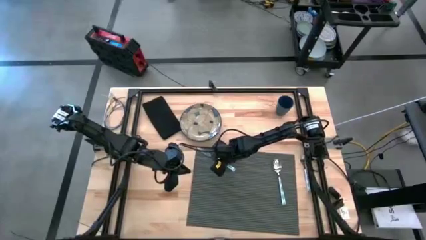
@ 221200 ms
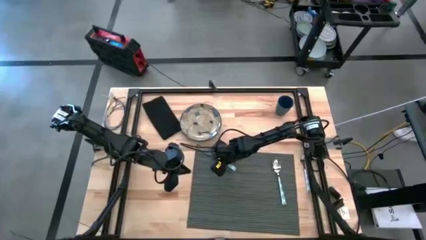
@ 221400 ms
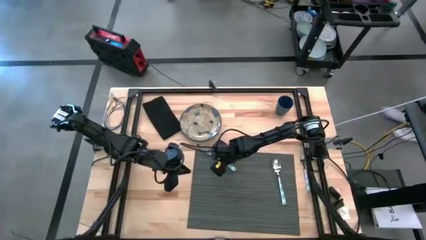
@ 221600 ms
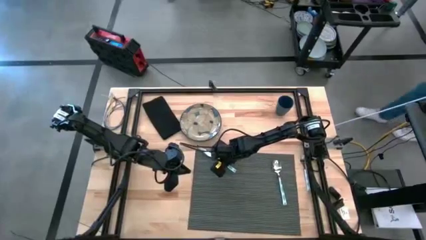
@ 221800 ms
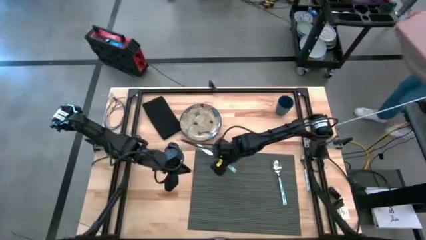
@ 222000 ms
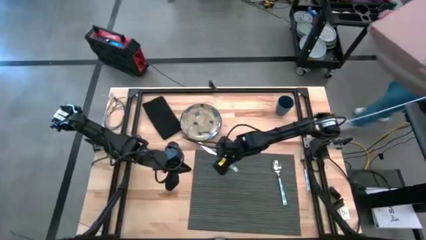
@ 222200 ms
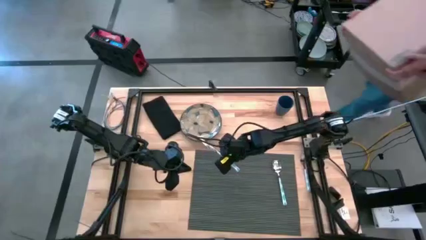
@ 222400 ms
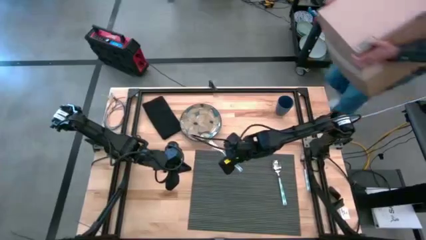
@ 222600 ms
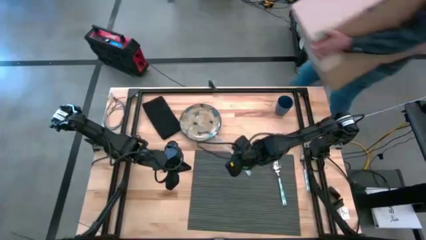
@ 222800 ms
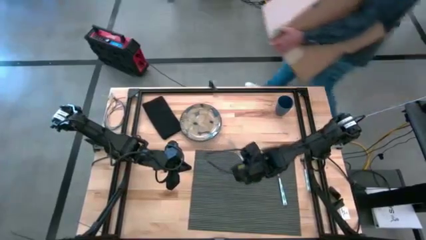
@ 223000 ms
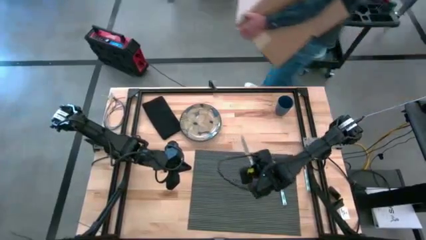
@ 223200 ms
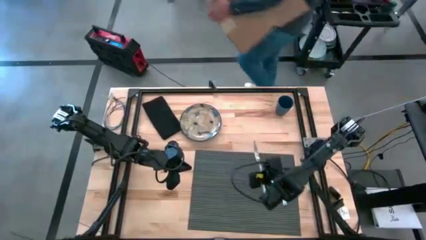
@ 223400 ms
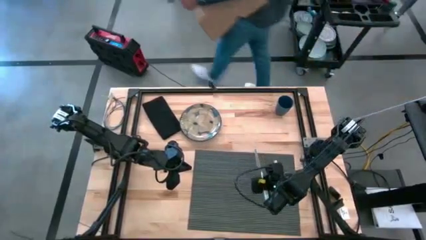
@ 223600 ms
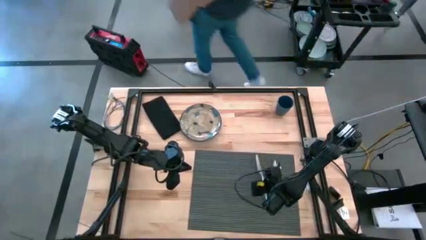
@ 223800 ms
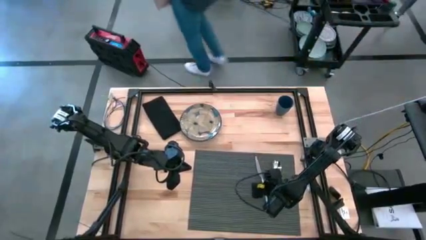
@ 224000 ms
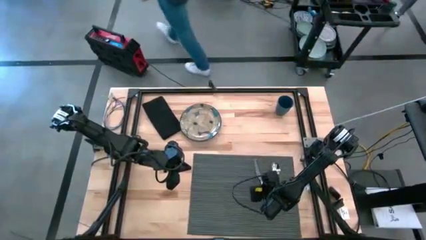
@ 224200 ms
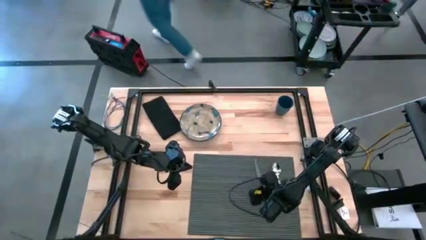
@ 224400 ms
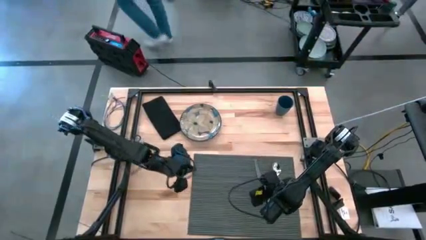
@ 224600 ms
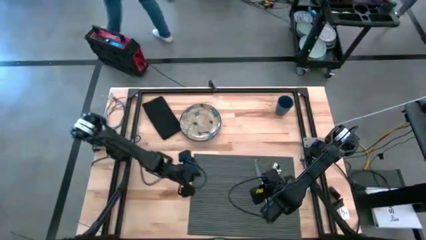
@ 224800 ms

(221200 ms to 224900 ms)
Task: Set table place
Put the blue knife on the gray mat

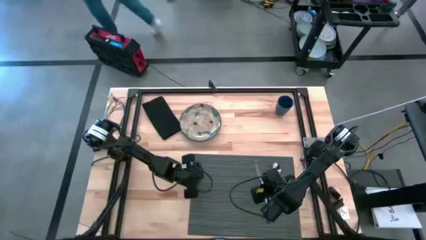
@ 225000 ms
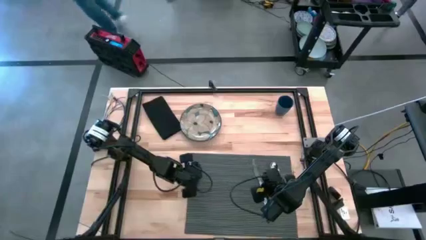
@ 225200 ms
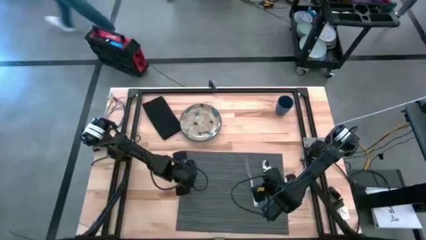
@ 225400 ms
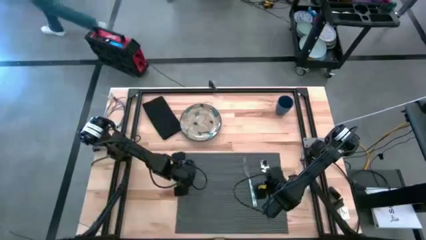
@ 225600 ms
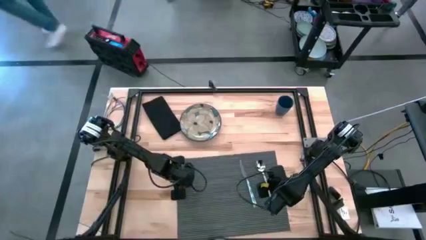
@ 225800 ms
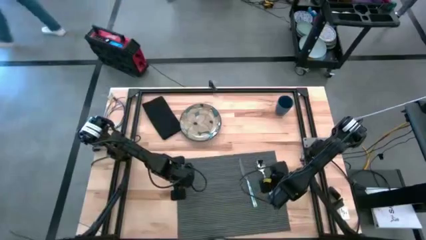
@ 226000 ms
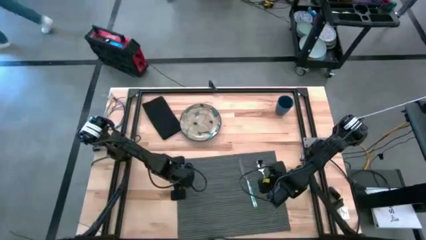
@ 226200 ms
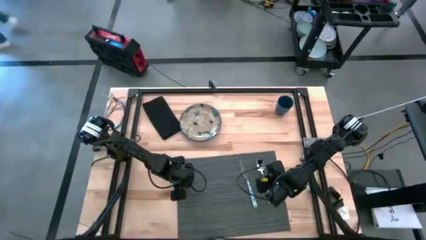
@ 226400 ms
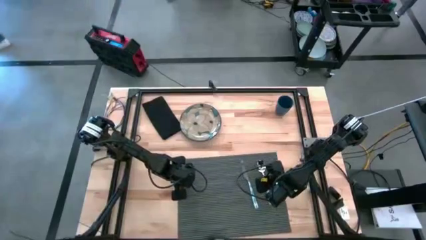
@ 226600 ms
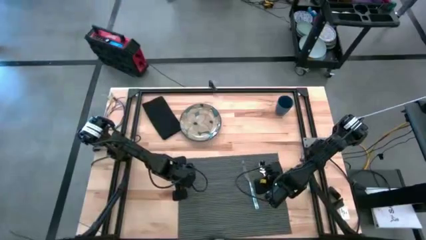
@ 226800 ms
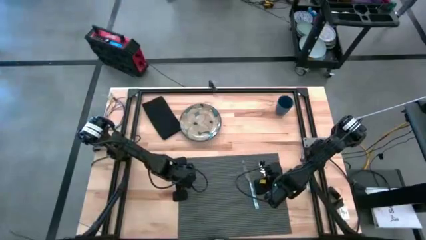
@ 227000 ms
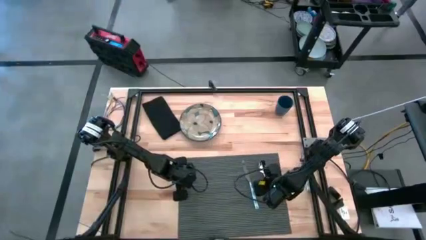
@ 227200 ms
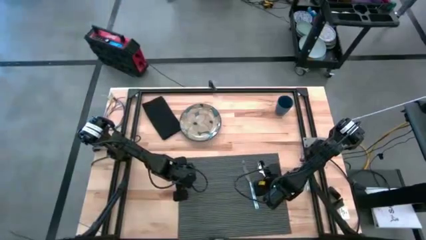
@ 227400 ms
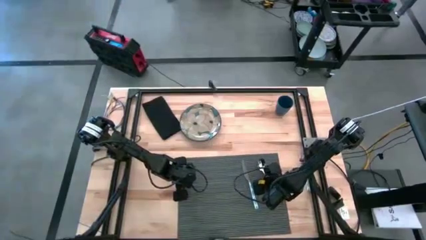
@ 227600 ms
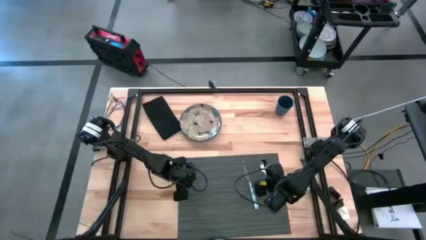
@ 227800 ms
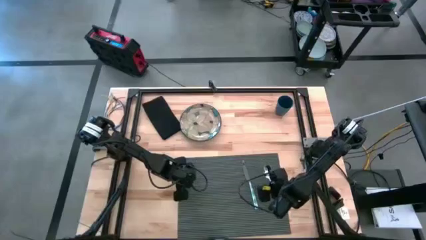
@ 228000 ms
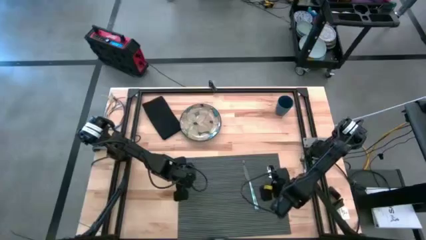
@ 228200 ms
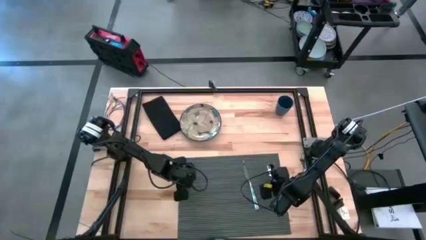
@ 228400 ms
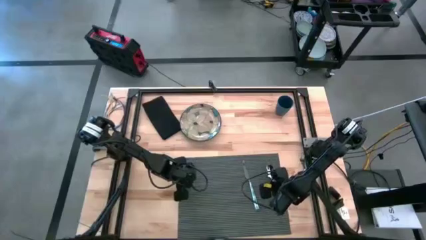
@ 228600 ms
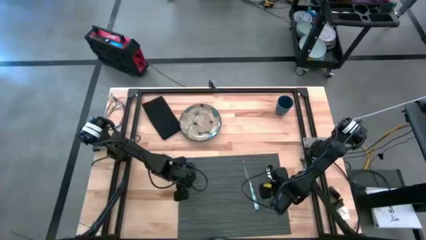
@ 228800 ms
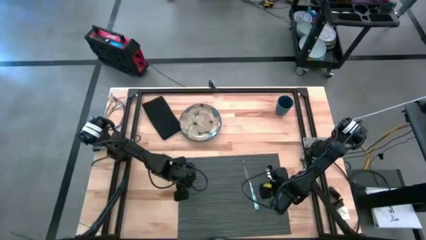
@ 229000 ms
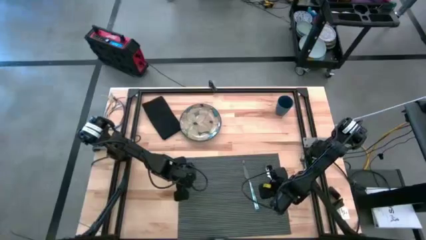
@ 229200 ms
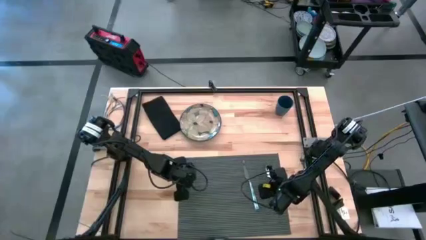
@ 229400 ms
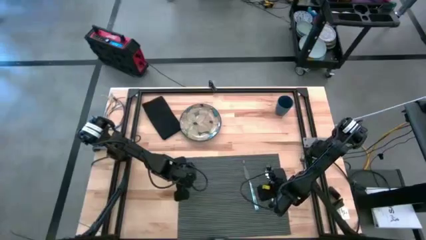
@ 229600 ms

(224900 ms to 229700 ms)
Adjust the blue spoon on the gray mat

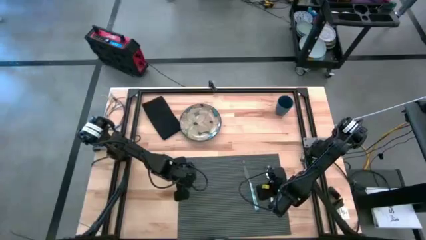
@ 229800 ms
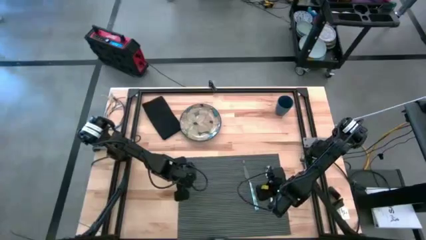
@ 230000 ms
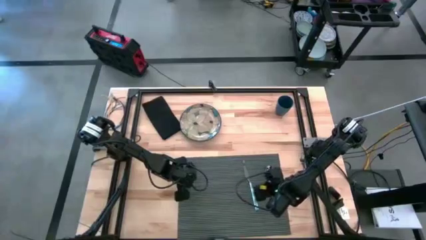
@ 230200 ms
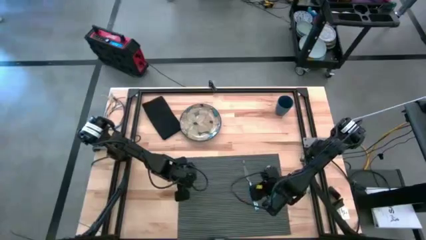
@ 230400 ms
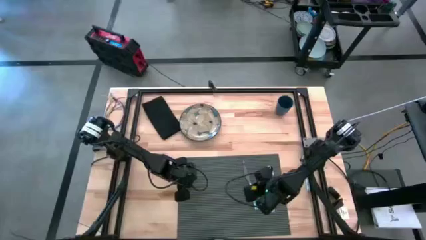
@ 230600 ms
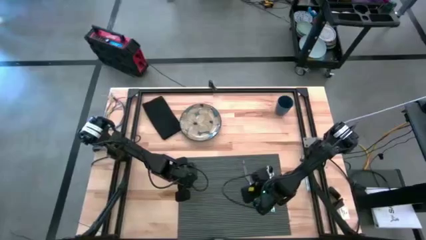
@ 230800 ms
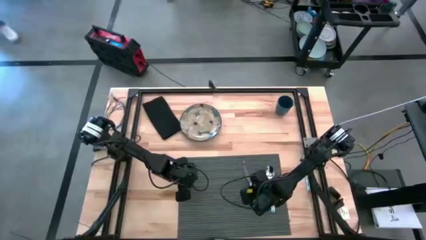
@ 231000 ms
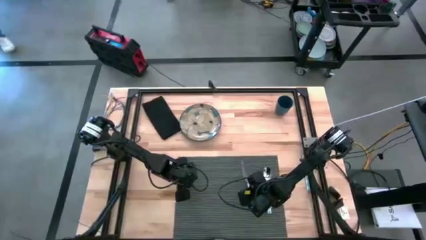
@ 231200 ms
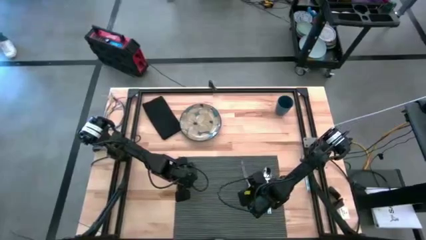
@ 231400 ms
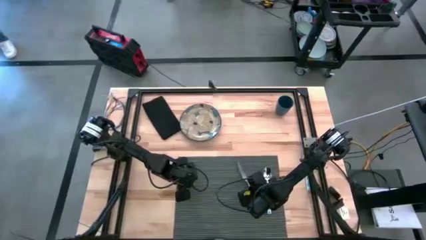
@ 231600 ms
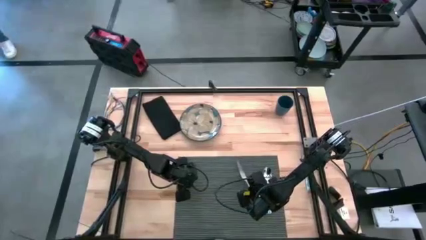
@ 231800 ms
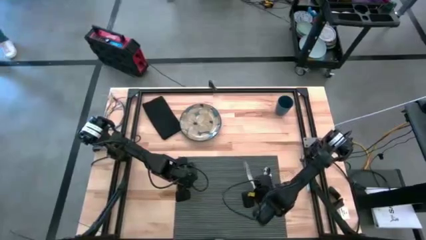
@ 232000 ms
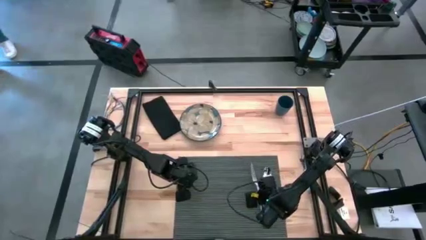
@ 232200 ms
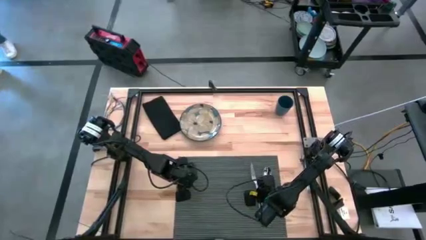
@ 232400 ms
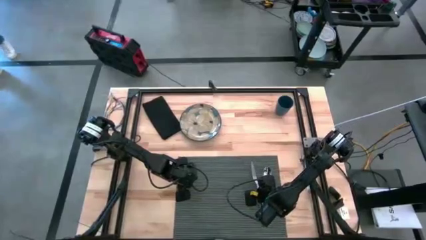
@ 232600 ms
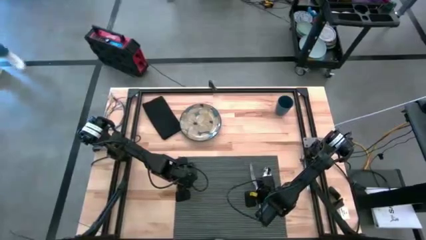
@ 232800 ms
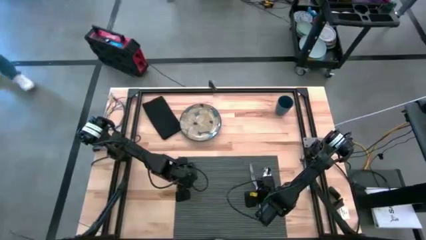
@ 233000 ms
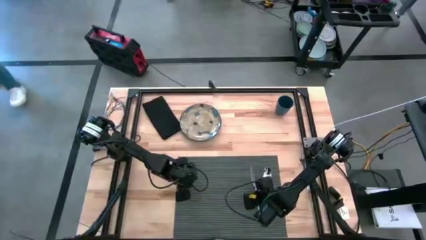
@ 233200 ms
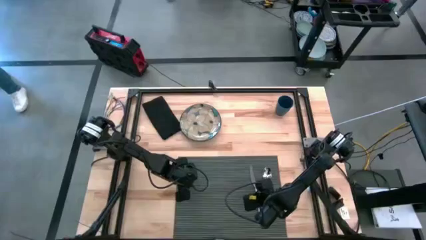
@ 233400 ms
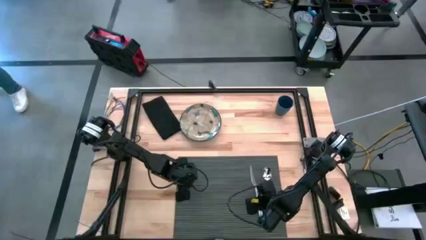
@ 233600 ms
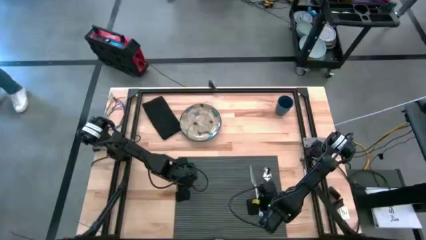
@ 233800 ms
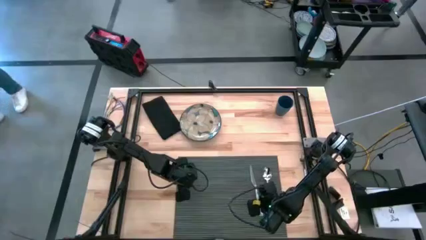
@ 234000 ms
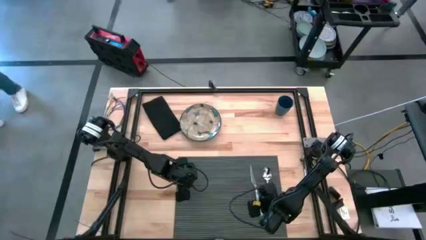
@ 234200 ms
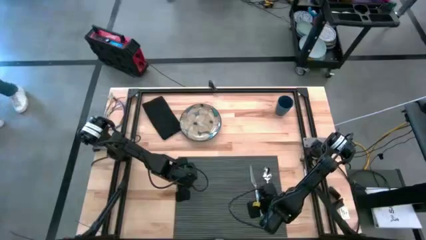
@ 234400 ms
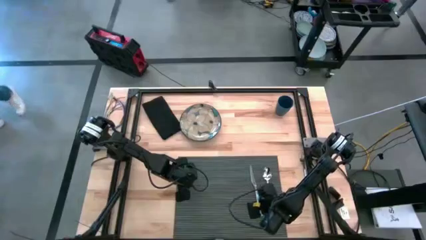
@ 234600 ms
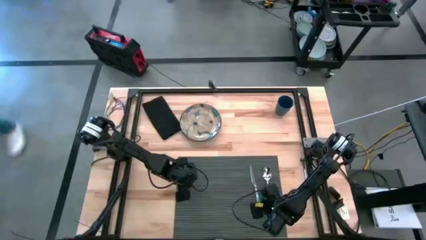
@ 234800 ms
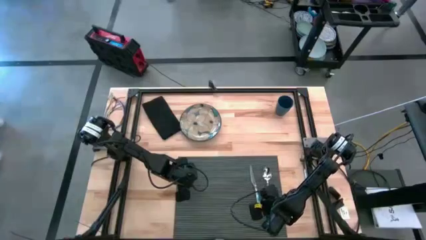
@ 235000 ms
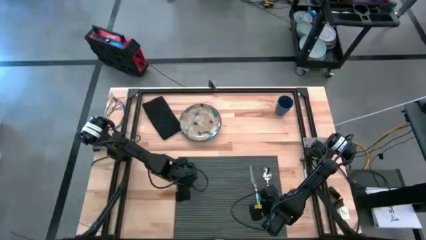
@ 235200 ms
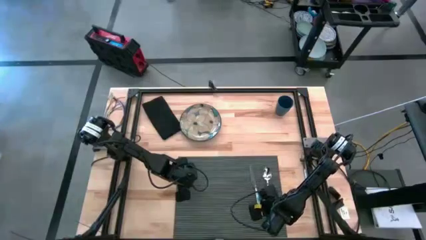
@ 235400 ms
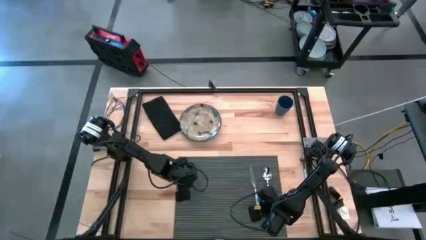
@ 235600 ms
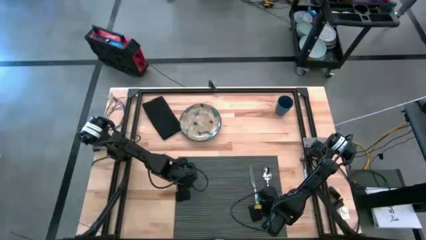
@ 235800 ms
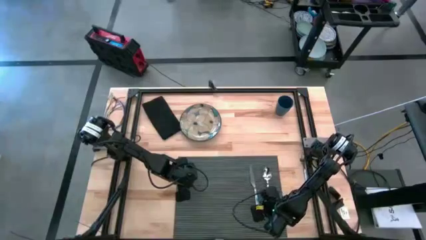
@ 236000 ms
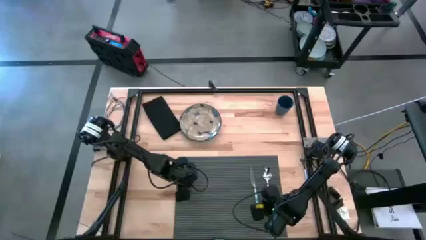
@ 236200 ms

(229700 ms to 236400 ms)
Adjust the blue knife on the gray mat

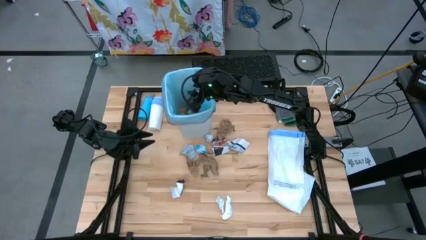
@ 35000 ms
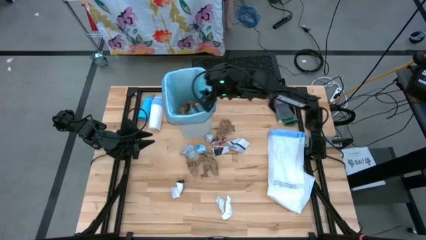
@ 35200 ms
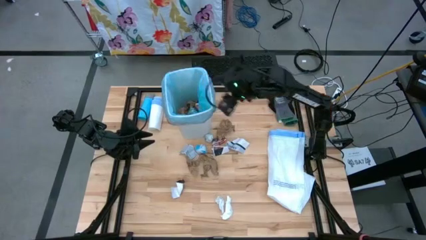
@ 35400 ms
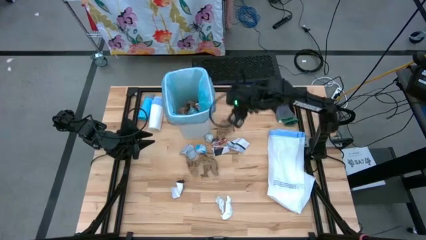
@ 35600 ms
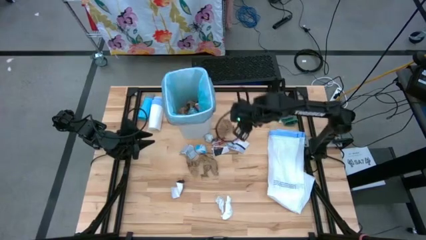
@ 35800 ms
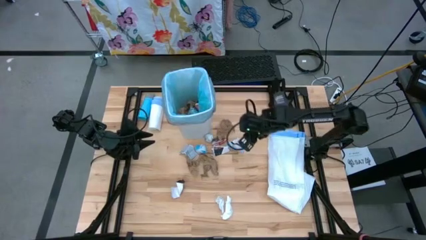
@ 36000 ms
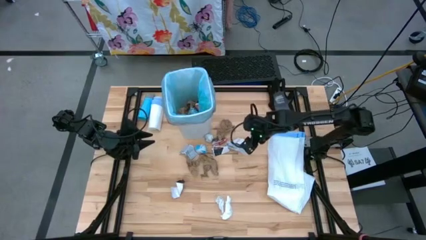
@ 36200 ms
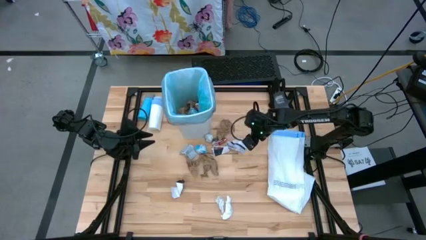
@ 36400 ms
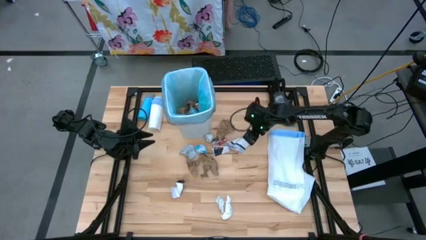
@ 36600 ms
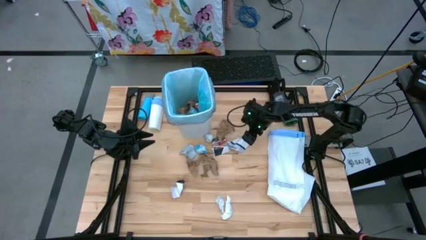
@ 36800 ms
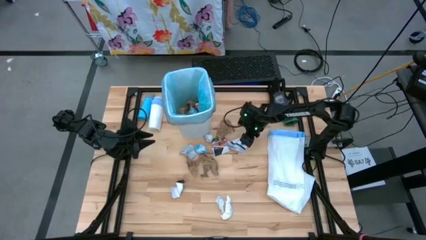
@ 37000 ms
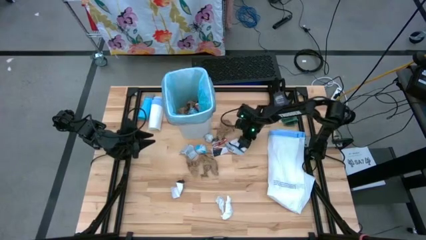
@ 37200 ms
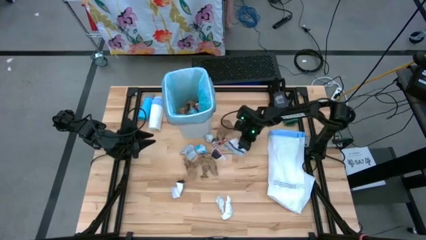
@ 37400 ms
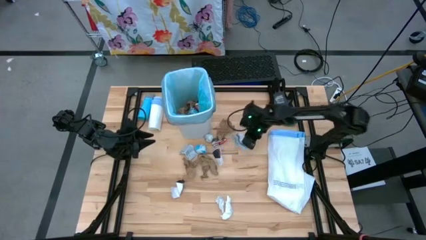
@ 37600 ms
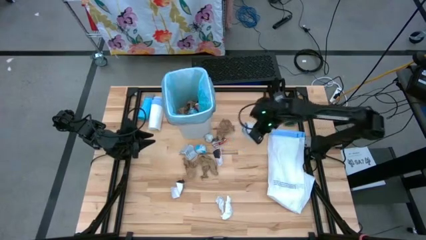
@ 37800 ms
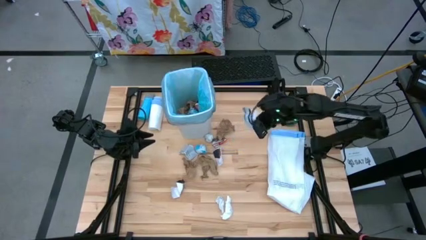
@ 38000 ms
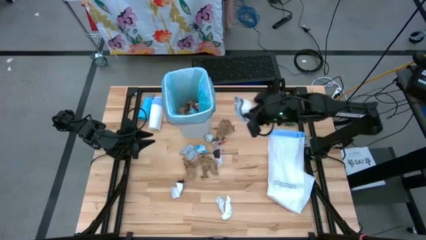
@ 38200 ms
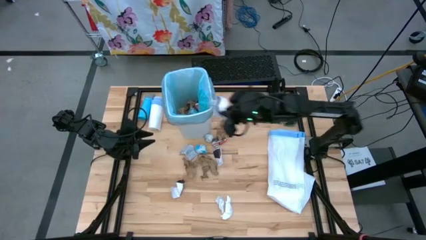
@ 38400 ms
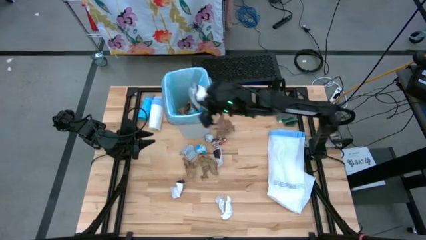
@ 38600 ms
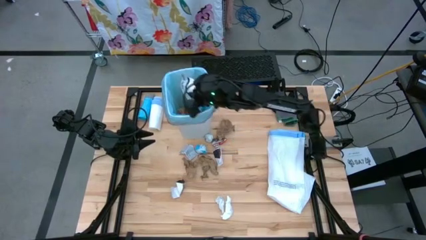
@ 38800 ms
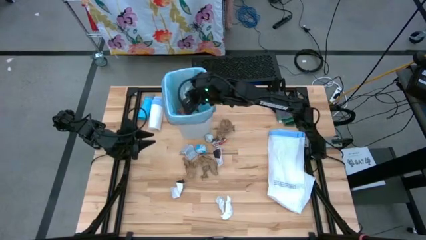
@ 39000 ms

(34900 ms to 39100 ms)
Task: place trash/remove bag and relplace
Put the white paper into the white trash bin
